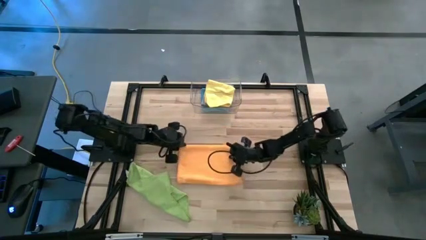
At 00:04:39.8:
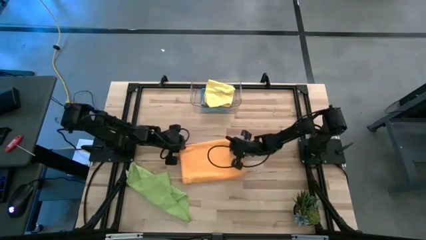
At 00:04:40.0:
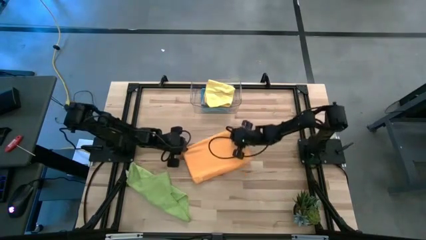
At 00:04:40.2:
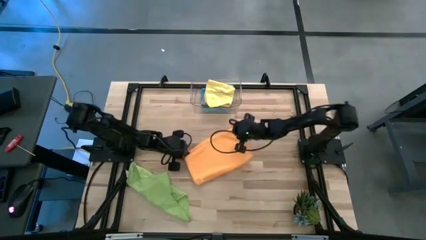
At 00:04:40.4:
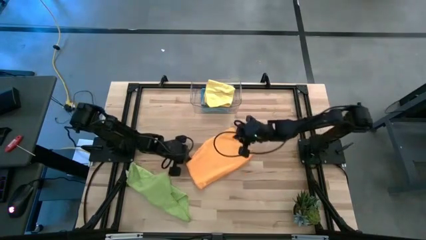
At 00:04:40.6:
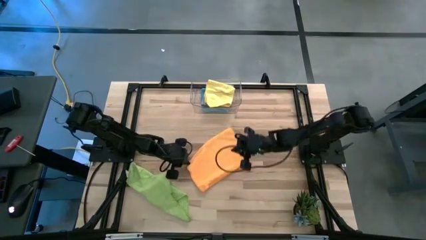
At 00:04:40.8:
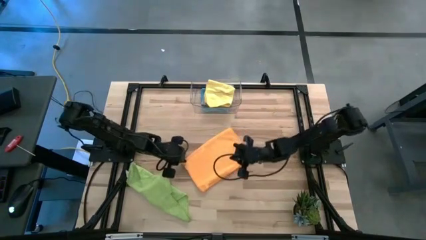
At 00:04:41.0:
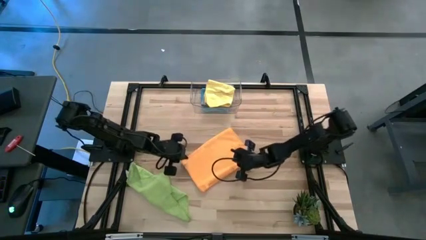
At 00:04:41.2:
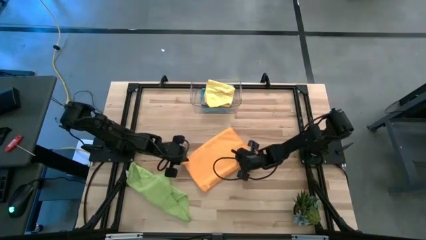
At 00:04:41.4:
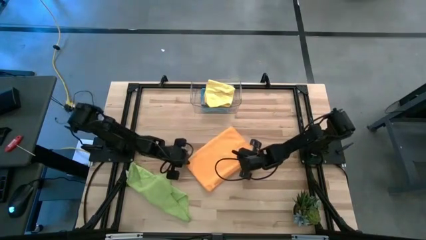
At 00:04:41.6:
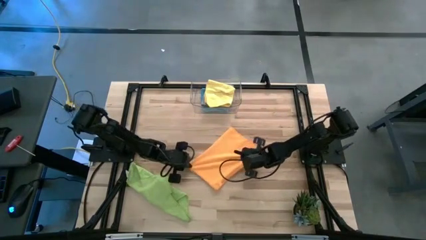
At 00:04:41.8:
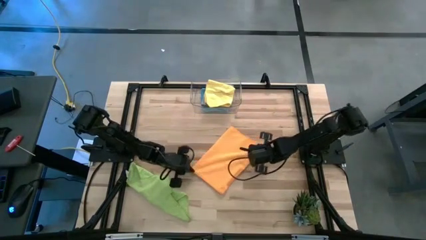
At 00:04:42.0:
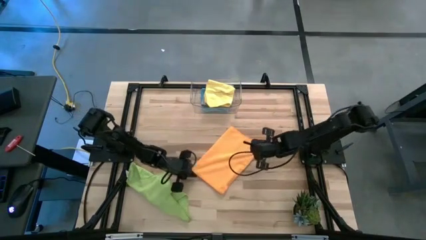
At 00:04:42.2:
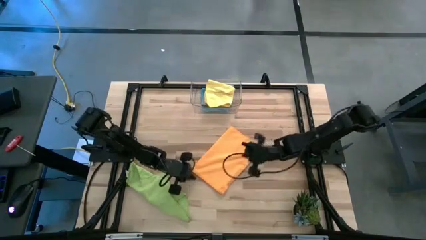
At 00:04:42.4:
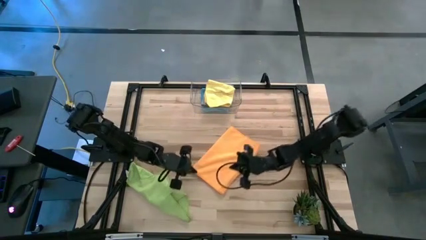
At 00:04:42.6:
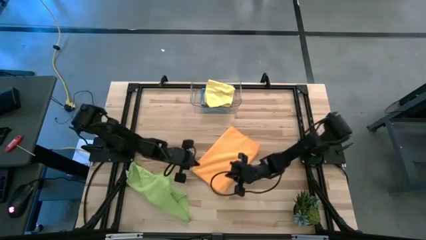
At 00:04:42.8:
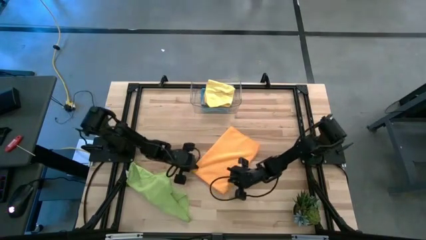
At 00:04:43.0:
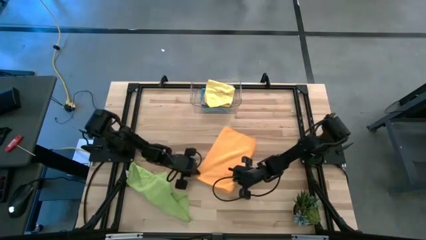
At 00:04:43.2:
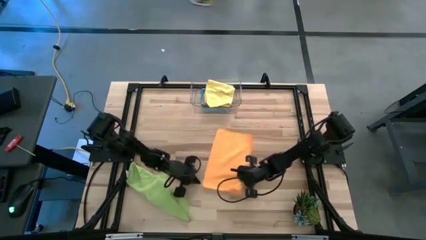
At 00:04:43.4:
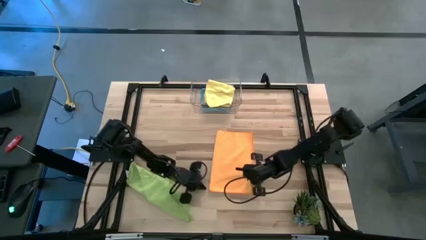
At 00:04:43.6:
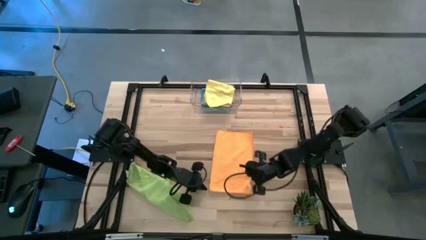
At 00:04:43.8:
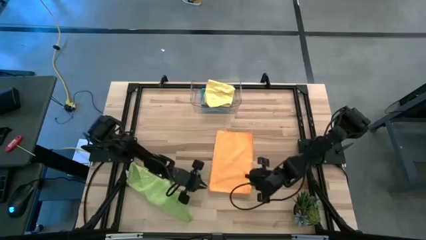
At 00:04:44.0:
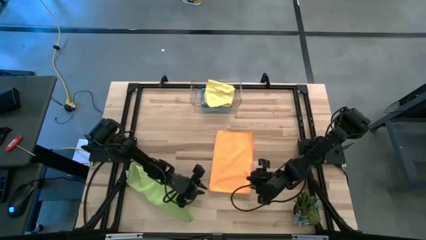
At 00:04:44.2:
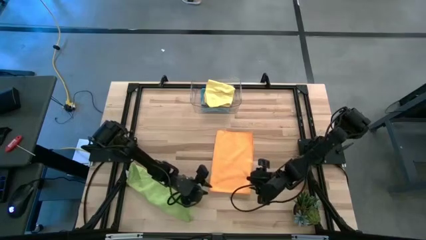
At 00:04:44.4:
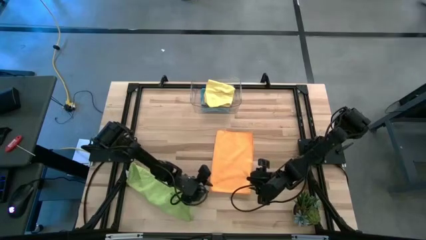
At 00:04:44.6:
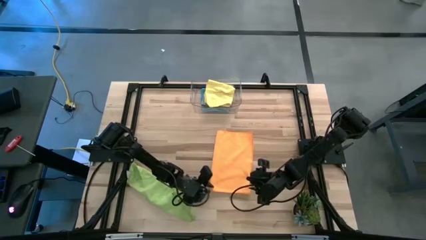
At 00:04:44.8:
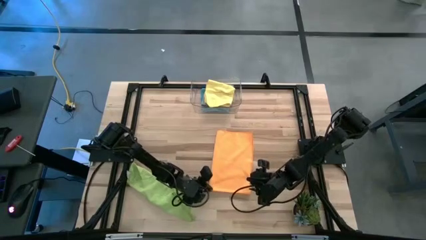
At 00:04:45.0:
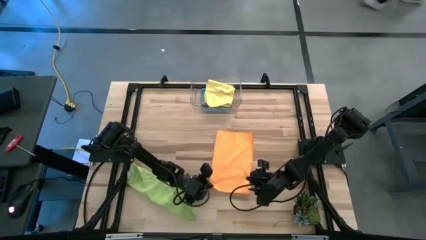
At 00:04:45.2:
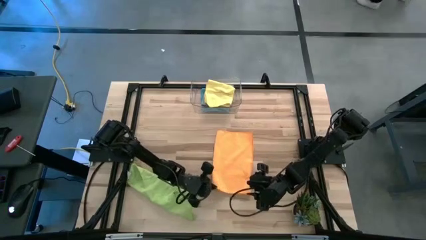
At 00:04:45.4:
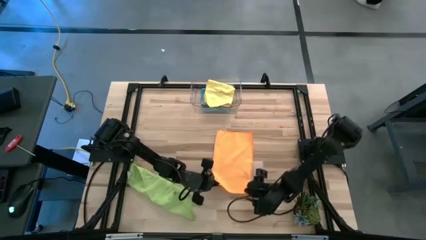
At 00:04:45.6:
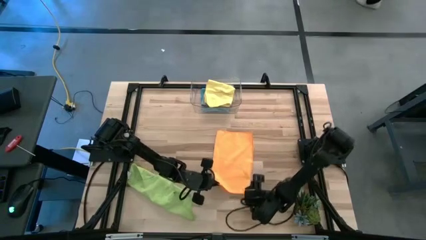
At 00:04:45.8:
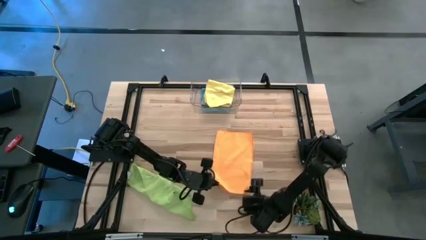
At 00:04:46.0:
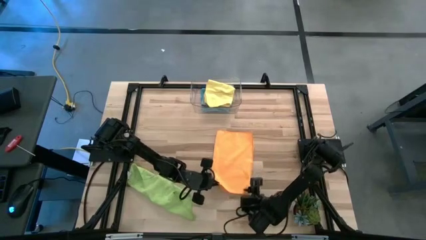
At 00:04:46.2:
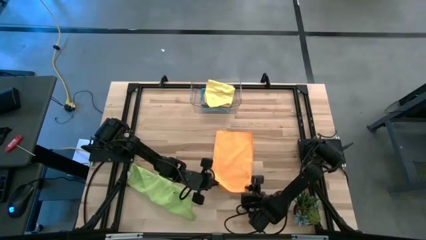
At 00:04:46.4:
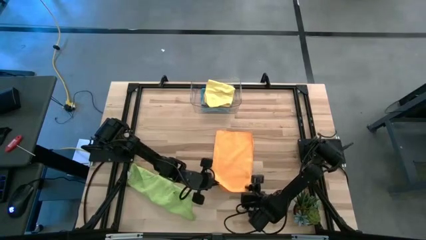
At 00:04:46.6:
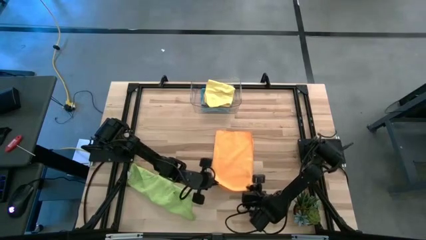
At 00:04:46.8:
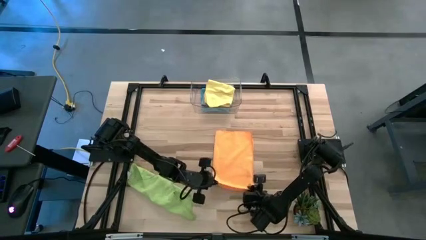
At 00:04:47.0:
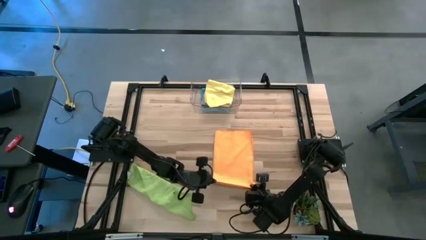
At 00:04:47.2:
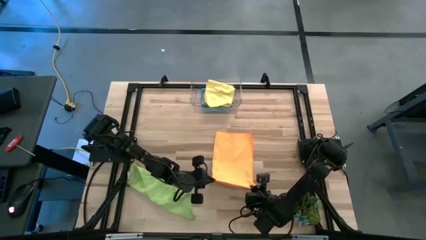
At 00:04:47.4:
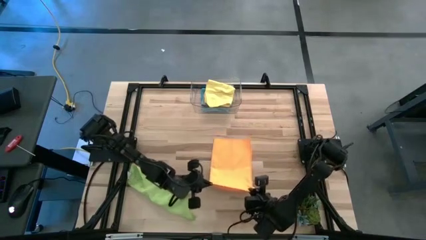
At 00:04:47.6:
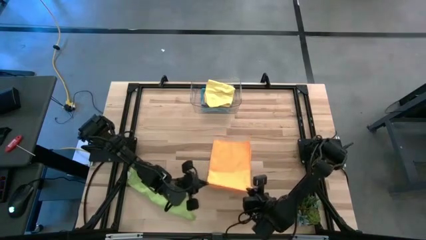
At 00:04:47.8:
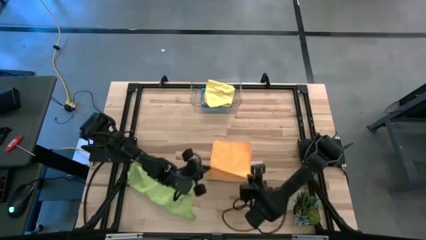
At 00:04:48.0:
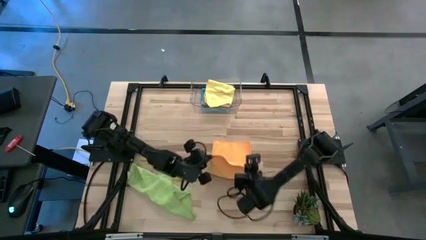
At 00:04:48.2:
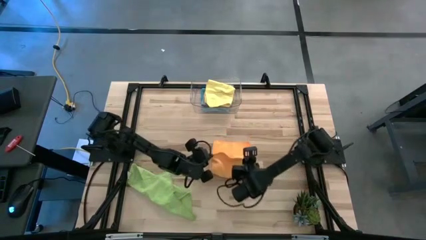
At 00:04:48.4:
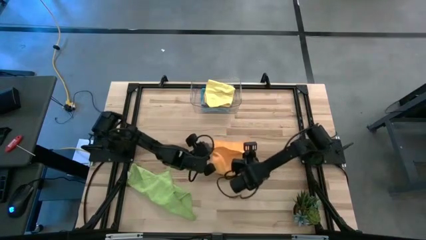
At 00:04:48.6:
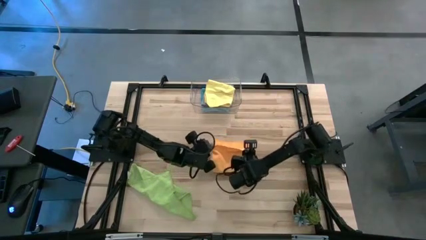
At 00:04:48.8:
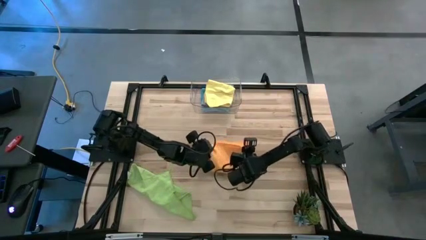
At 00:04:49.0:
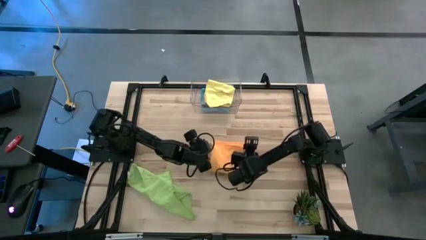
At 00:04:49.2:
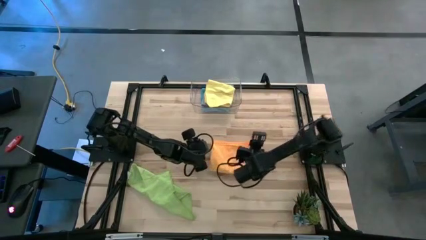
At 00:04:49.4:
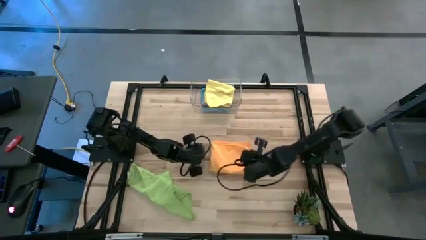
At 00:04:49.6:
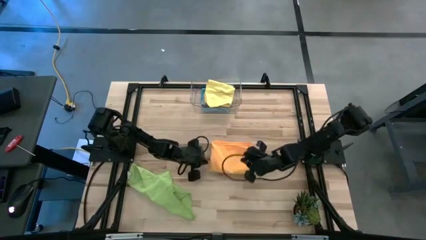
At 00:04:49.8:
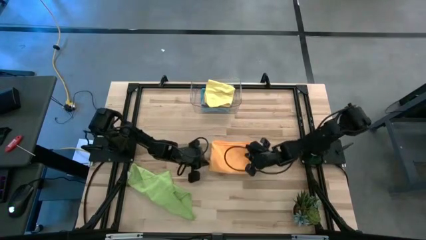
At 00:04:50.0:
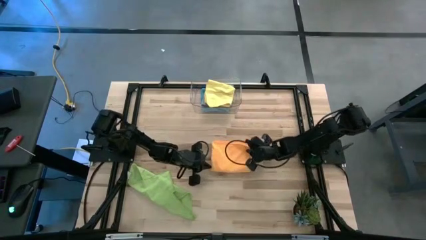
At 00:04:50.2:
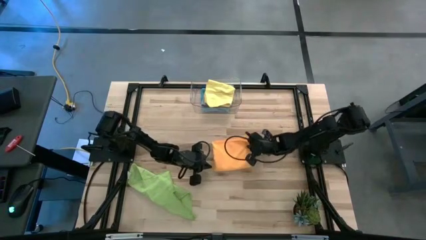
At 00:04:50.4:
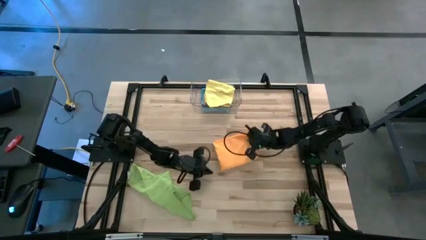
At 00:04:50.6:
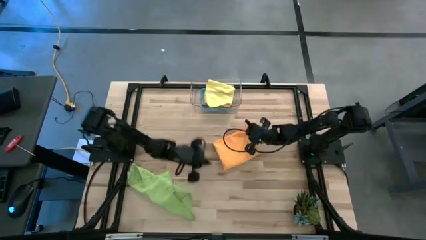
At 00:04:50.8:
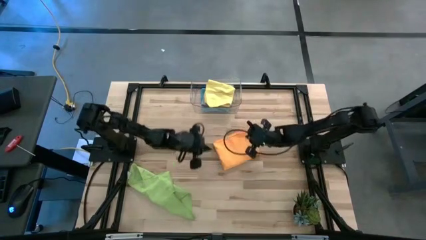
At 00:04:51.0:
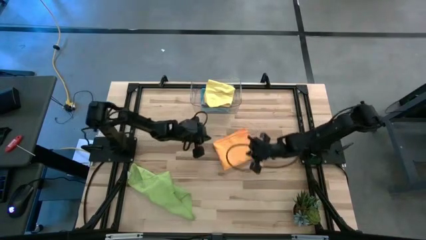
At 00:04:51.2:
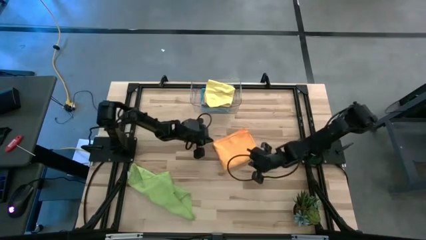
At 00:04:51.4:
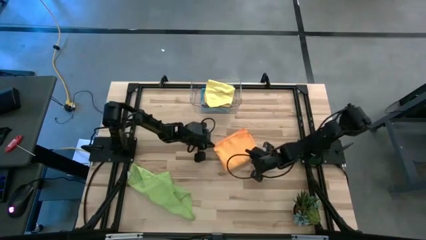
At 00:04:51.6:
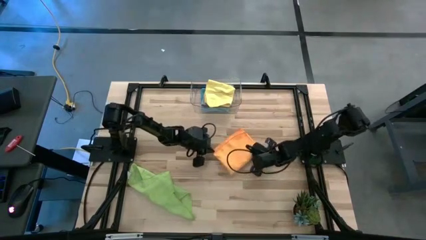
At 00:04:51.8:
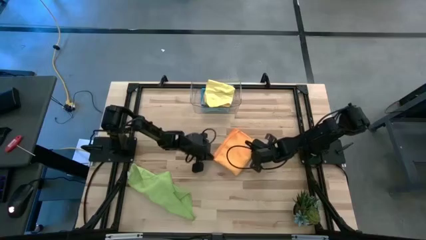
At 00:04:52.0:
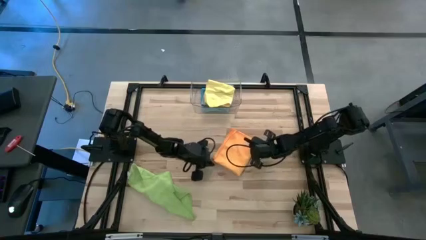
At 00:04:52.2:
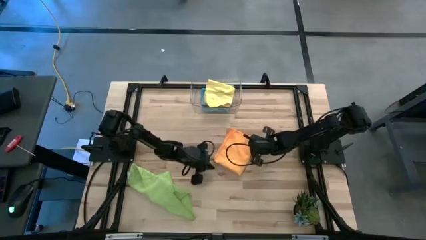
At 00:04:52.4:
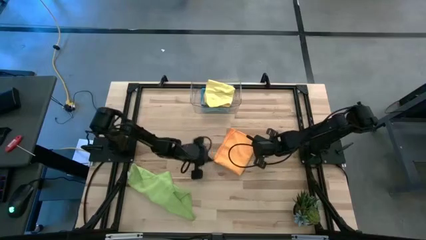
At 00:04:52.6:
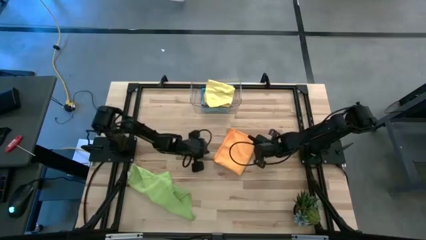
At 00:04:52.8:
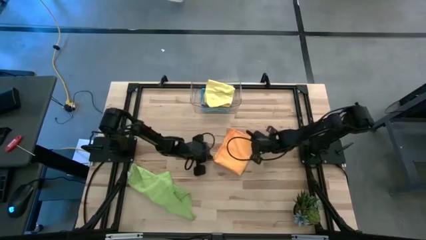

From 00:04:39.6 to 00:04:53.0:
Task: Fold microfiber towels
Fold the orange towel

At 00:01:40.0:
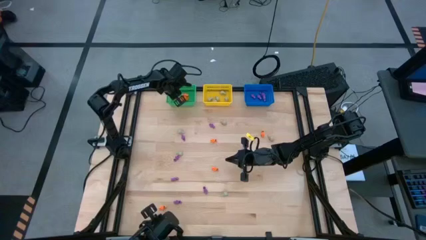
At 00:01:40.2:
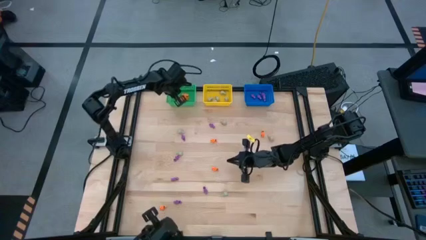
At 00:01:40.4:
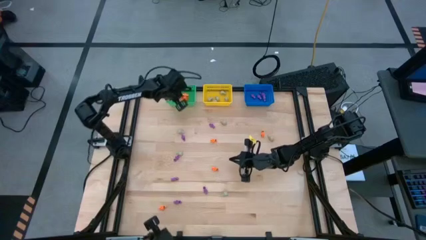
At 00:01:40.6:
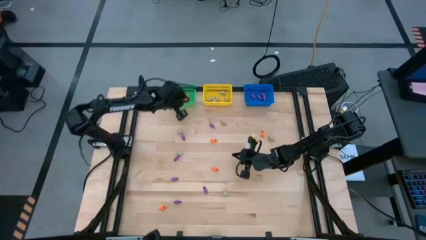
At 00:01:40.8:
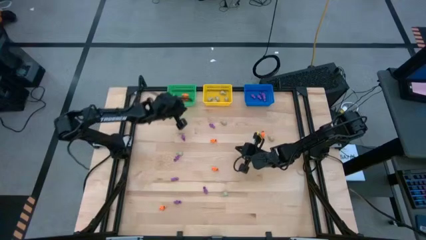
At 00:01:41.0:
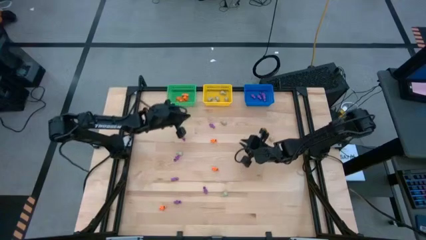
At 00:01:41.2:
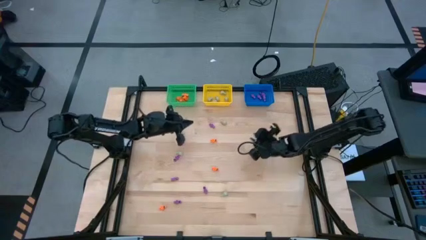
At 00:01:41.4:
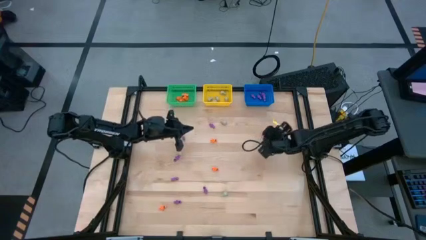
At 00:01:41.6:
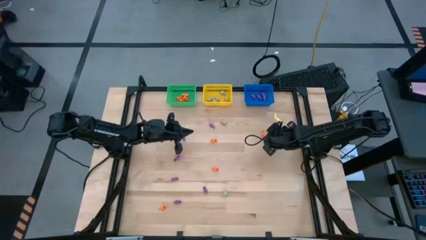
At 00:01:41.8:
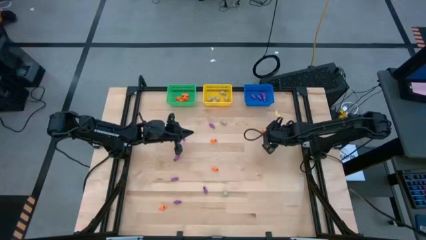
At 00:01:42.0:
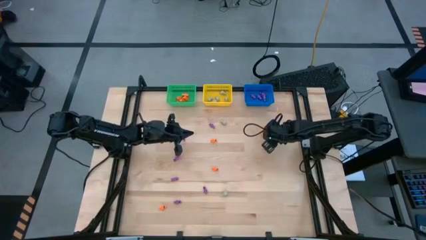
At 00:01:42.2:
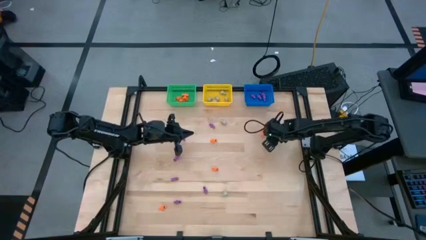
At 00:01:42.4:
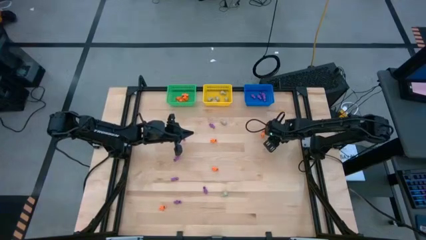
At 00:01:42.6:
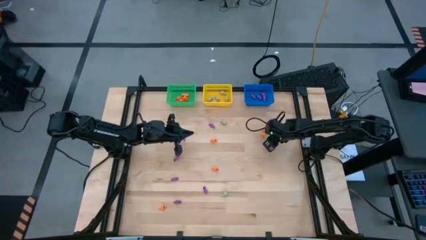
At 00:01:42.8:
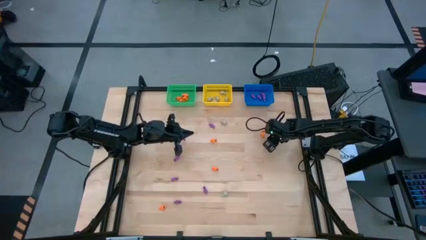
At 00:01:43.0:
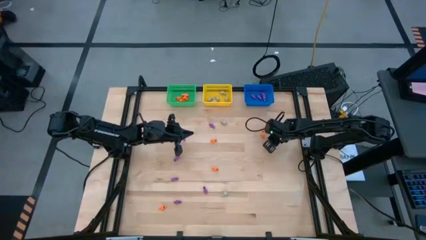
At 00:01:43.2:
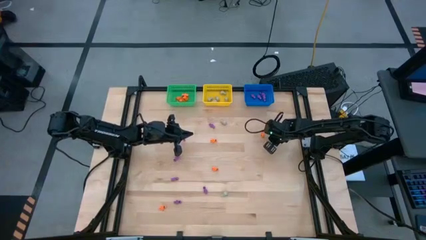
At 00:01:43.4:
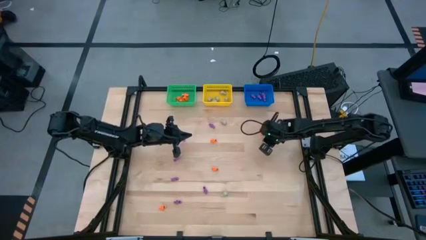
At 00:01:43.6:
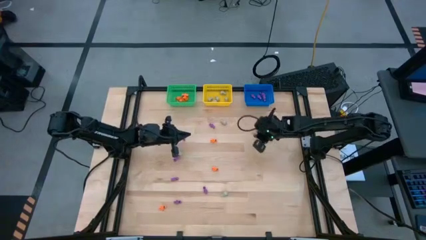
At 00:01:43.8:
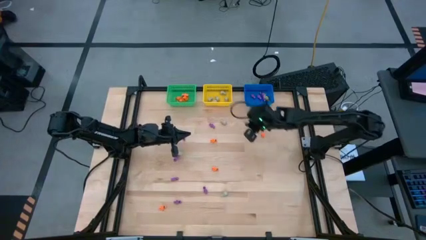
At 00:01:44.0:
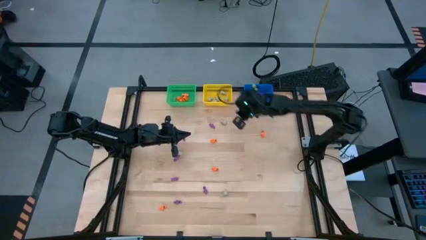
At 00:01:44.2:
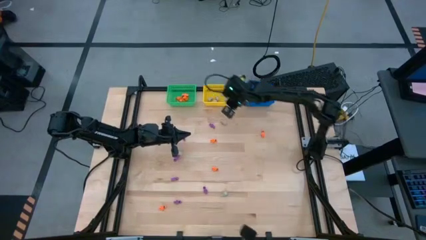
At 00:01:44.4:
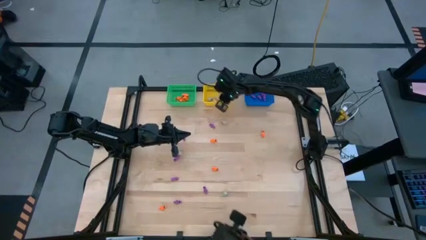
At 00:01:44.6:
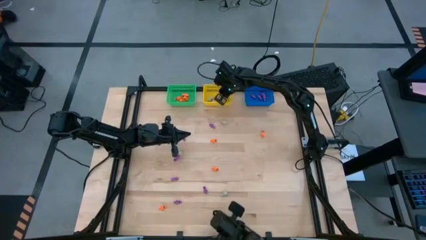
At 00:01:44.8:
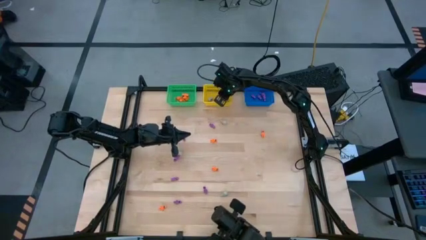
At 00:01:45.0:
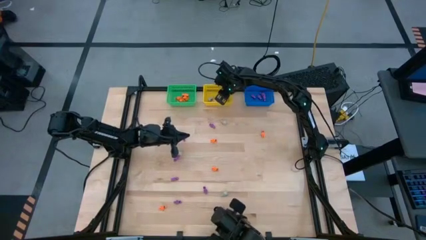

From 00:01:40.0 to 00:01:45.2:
Task: Sort Halloween decoration
Put the white skull toy into the yellow bin
